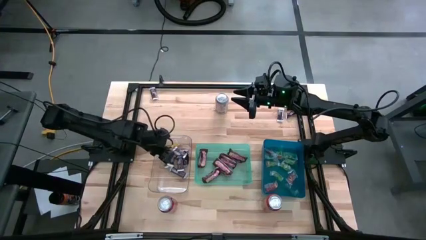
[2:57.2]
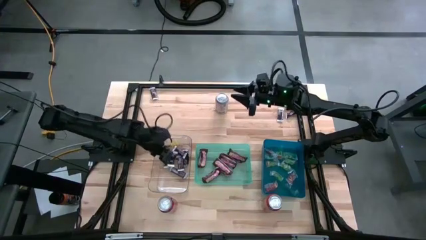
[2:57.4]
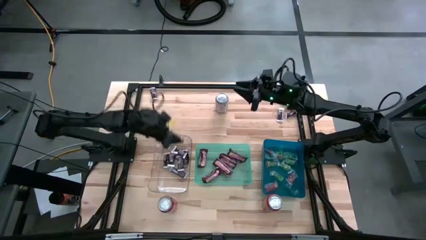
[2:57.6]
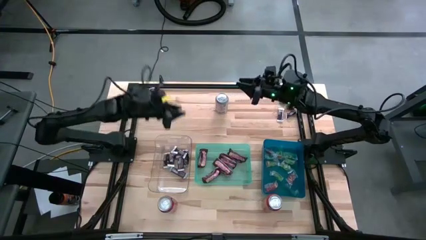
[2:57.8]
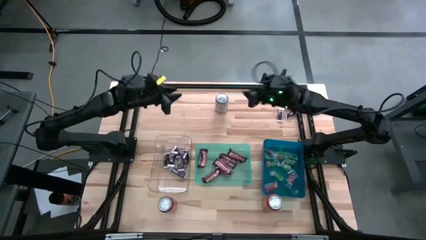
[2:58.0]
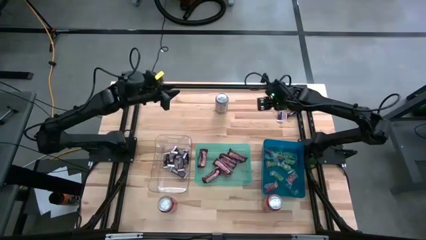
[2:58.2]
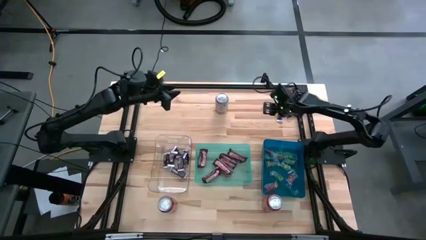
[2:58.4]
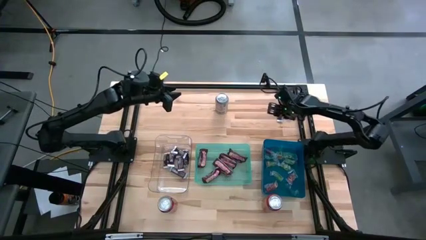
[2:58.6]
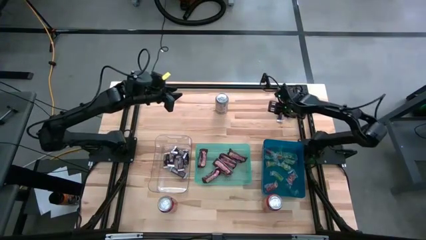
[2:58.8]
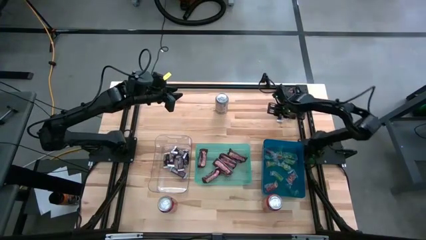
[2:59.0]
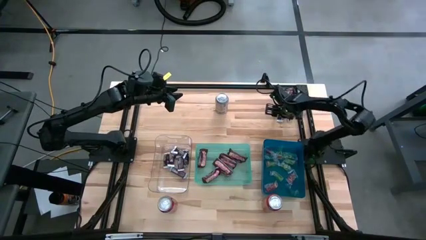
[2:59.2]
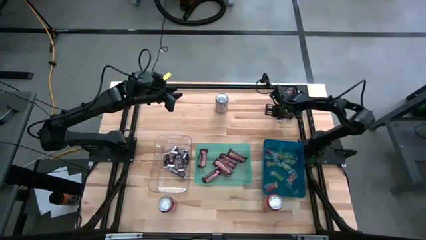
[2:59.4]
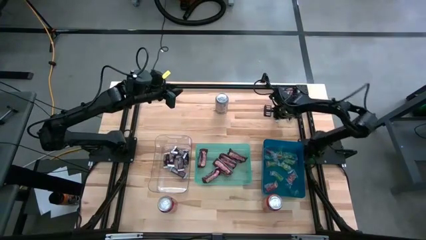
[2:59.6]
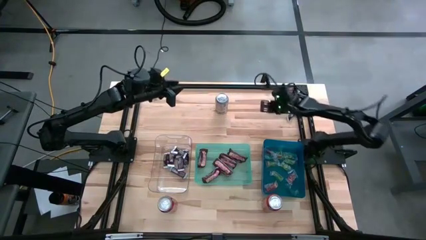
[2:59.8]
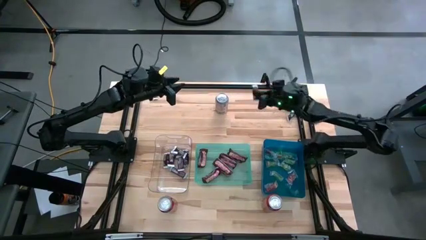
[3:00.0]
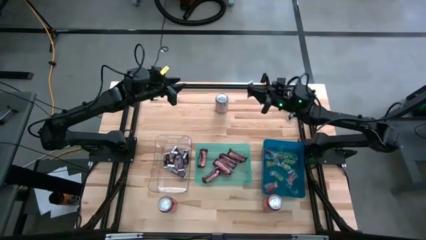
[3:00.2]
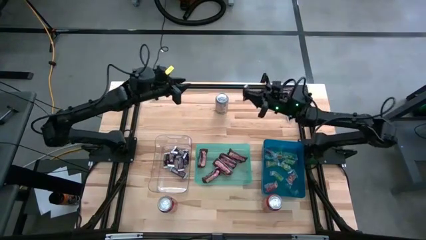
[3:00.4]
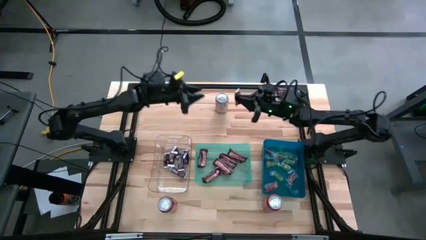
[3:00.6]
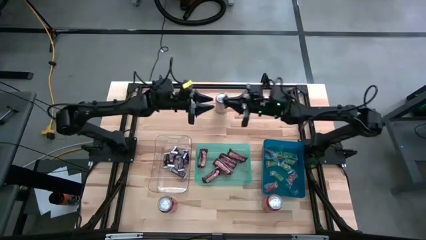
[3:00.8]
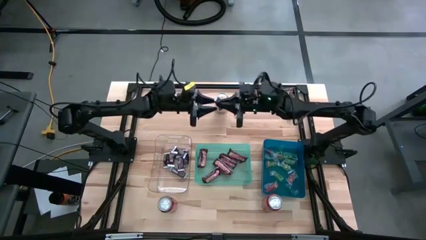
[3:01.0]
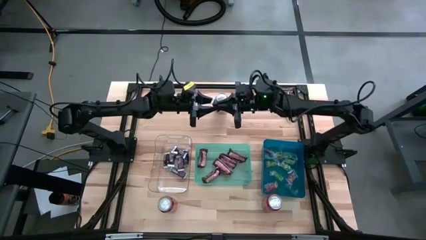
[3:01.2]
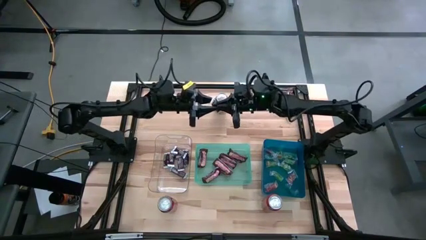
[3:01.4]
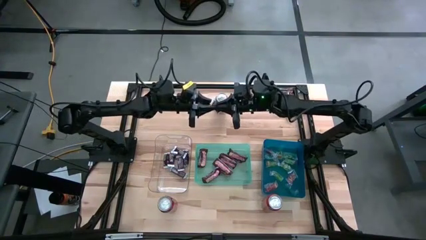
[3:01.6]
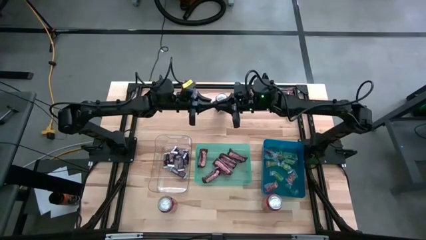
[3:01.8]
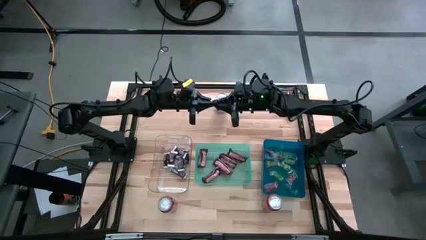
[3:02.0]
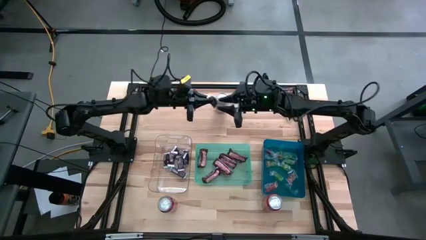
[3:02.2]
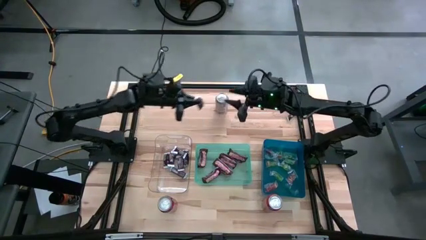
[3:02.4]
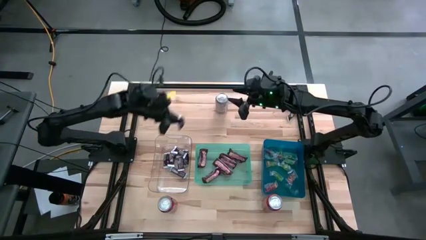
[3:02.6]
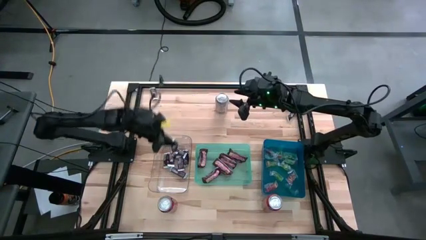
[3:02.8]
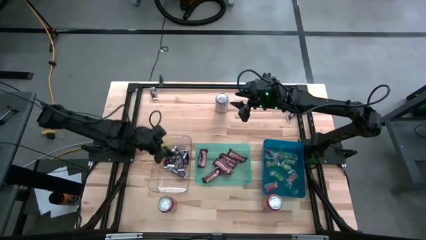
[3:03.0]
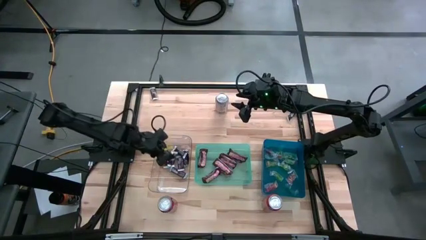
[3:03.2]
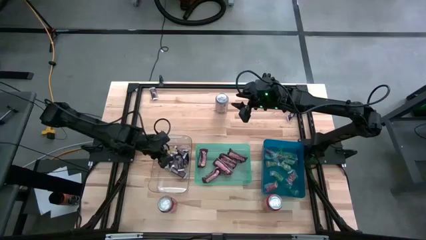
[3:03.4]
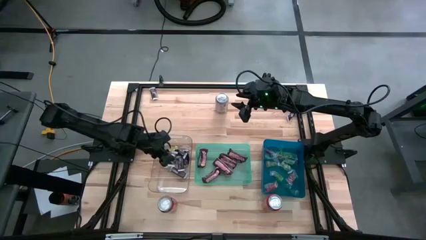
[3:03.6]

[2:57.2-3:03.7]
Task: Organize candy in baskets
Put the brown white chocolate bar into the transparent bin

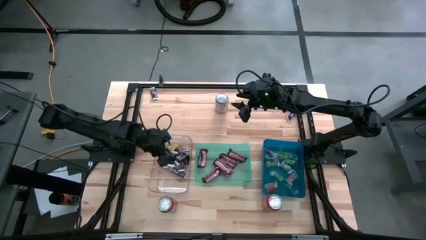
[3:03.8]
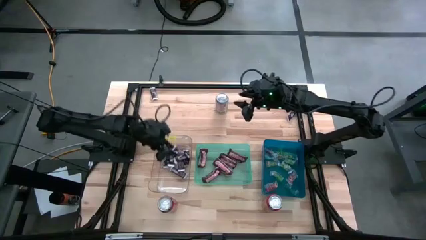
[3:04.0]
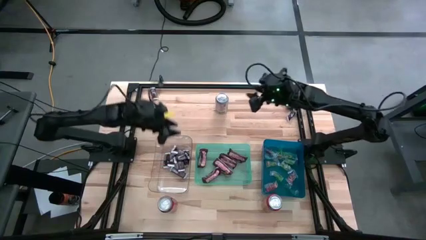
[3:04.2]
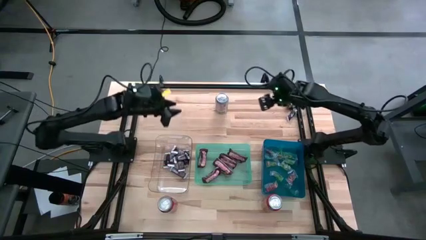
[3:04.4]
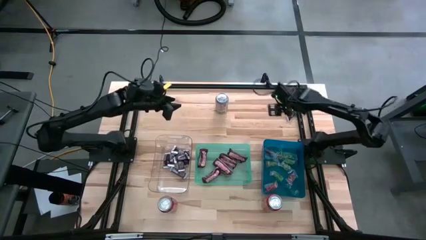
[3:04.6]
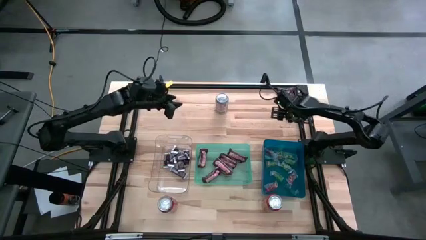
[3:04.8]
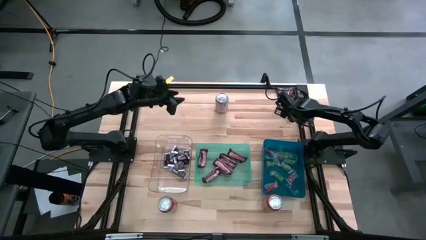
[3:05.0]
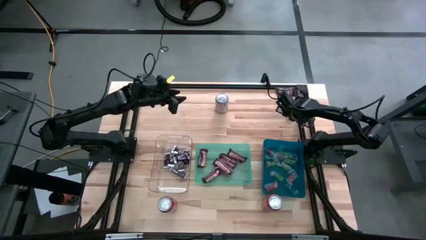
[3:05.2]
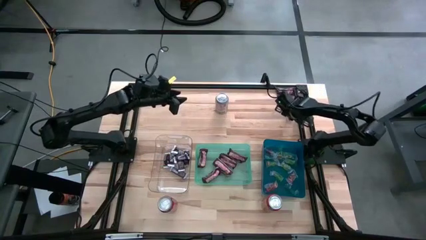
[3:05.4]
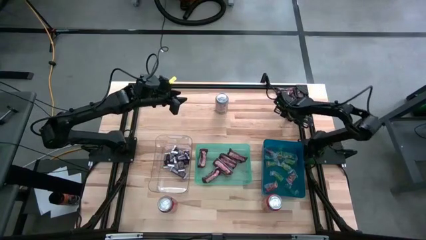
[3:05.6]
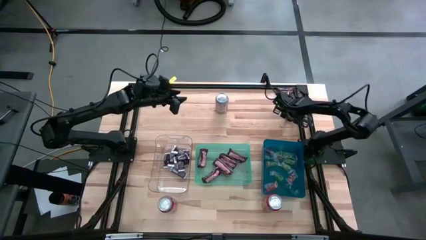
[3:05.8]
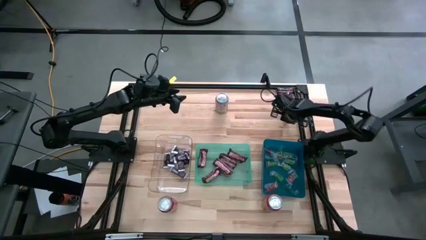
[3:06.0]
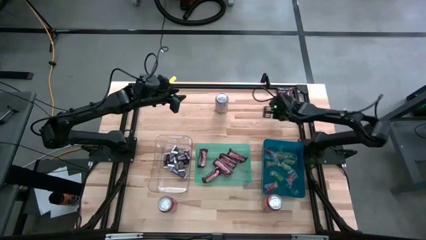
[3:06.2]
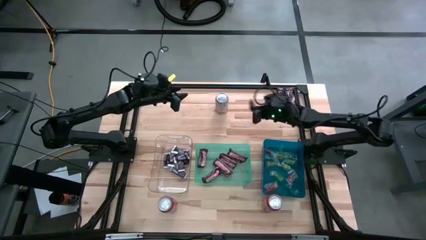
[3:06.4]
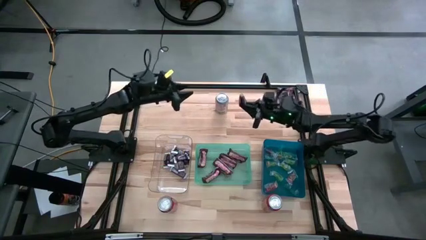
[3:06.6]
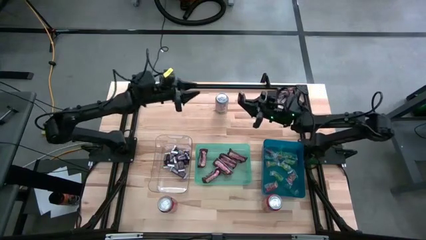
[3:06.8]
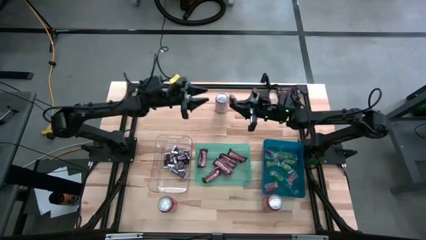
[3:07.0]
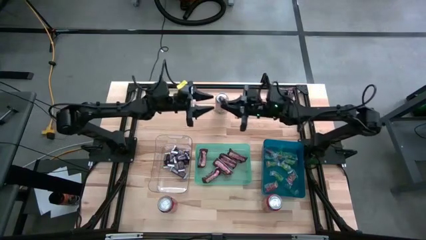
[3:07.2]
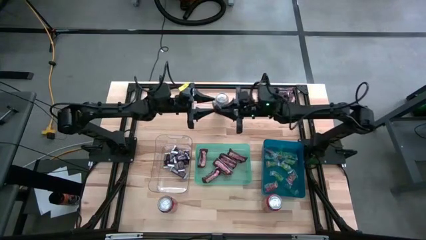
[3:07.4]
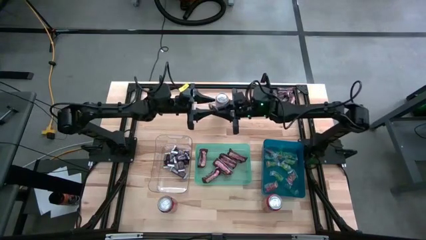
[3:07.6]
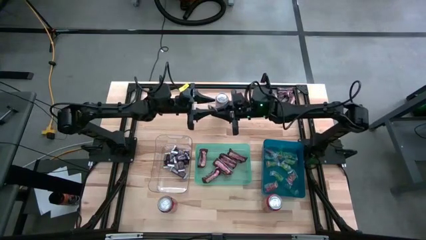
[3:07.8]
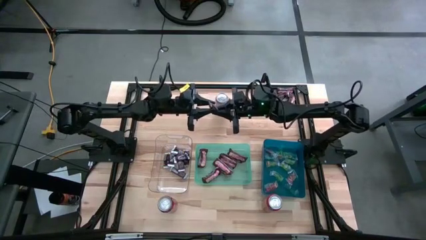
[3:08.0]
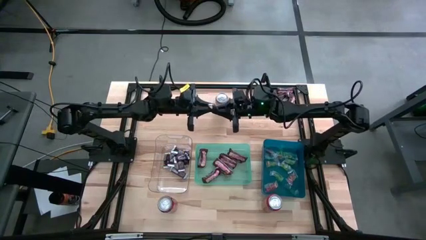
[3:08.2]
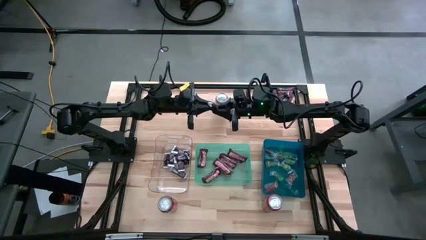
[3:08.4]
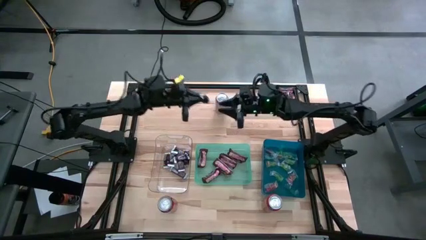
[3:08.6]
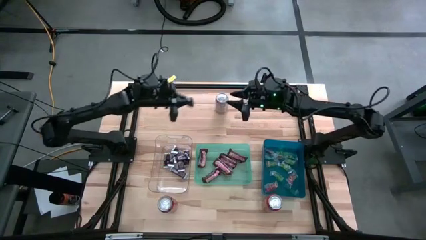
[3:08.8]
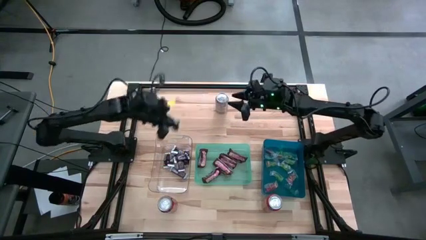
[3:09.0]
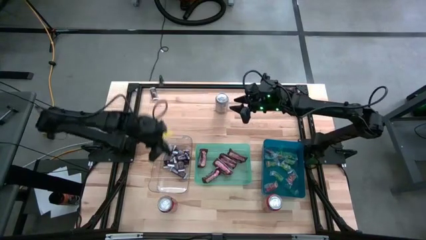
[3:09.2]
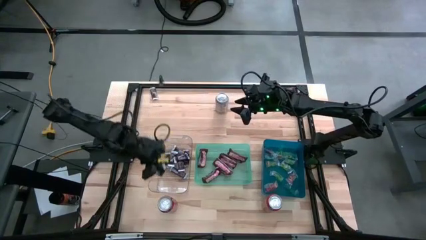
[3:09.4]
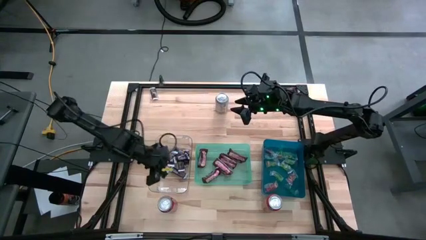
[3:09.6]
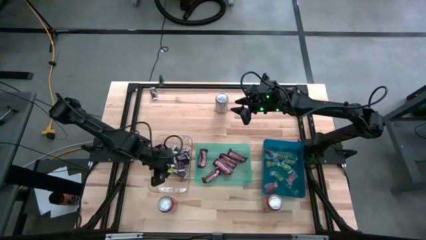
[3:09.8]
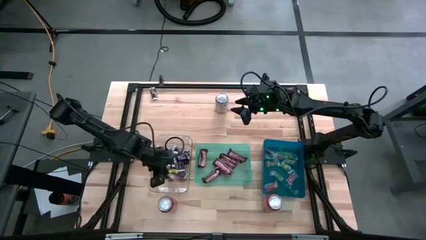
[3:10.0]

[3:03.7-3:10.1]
Put the brown white chocolate bar into the transparent bin

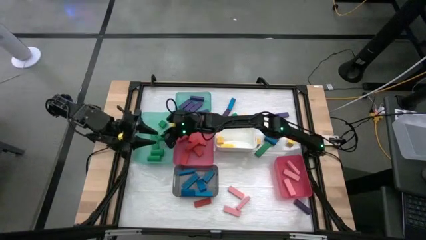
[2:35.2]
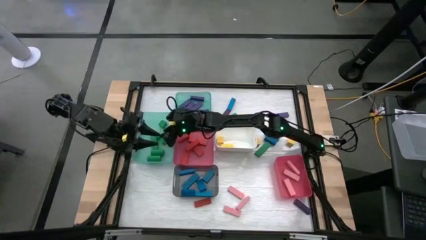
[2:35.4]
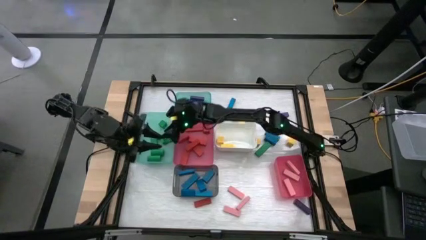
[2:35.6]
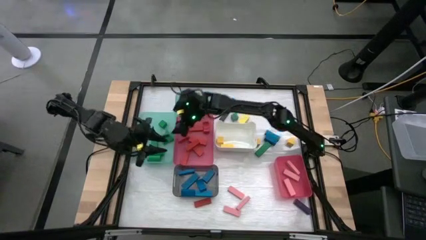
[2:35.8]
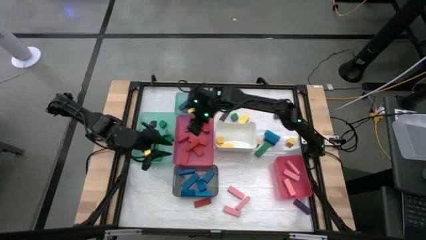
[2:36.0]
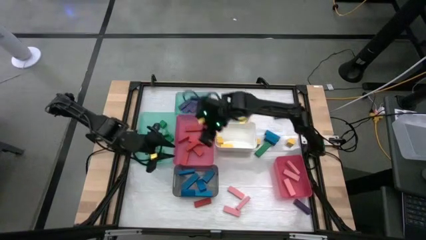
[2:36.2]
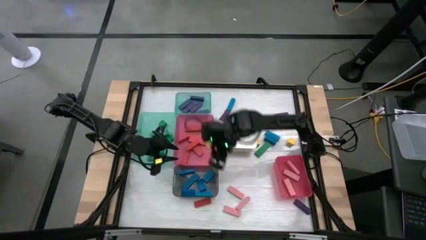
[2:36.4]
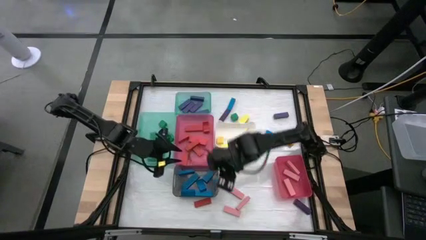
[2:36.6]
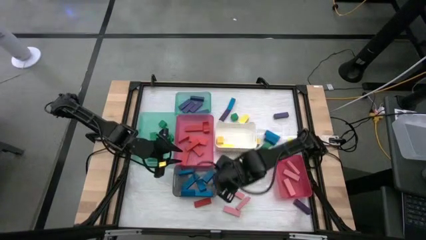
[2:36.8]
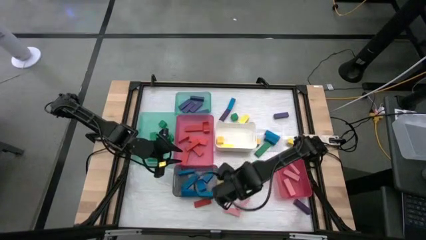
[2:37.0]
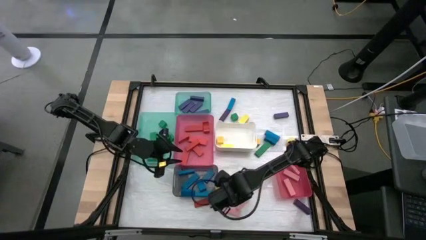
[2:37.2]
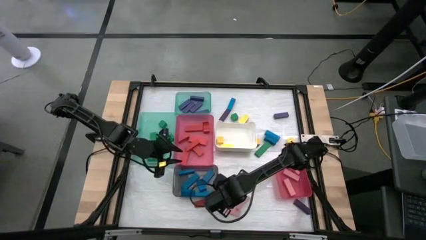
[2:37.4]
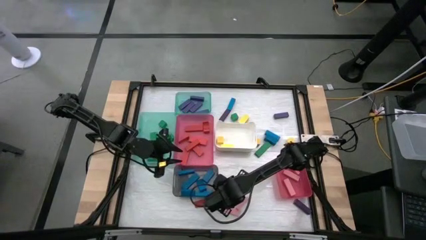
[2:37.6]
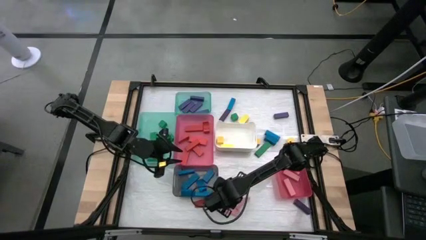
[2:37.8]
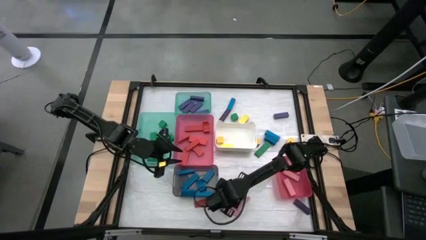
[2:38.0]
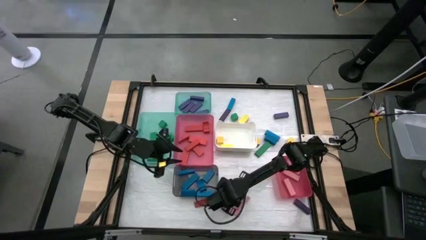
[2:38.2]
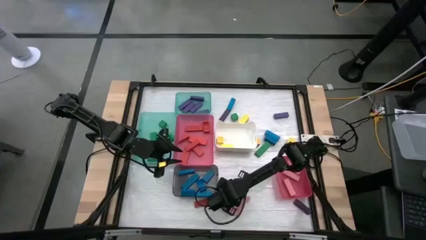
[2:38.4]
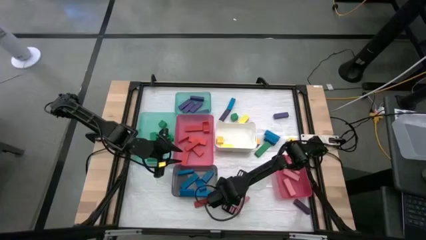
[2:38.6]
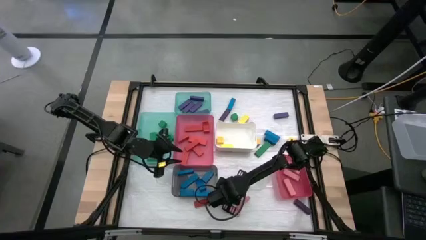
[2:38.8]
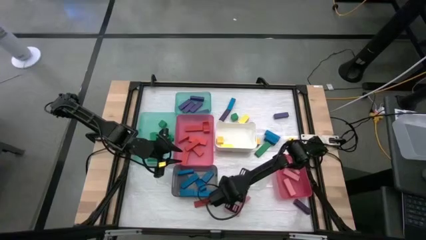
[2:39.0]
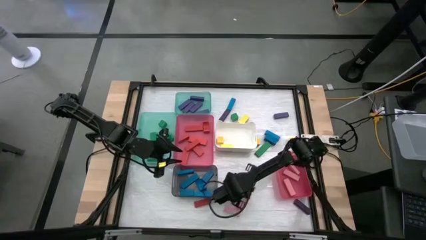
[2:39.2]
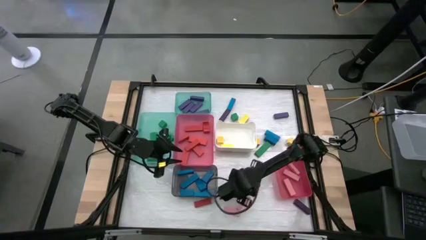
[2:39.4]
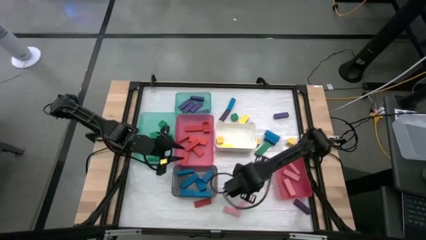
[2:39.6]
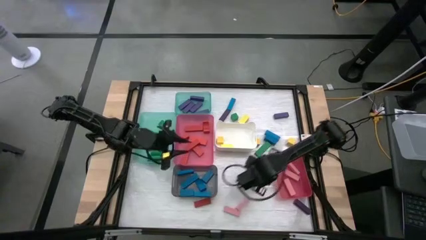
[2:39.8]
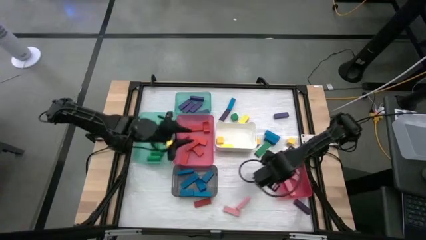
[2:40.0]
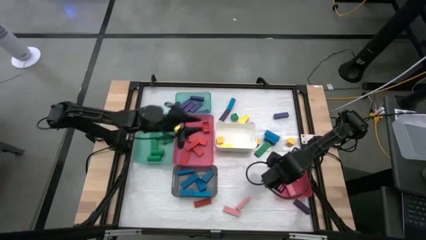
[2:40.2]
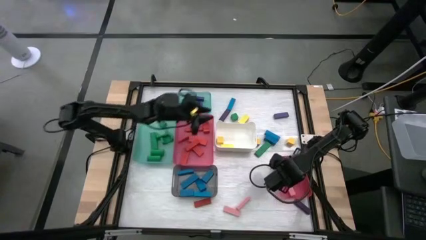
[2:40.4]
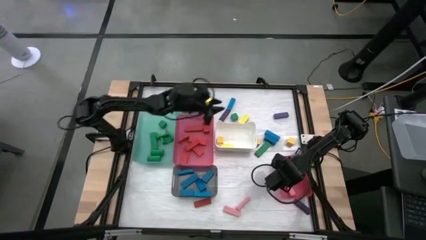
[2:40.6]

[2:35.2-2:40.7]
Task: Sort blocks
Put the pink block into the bottom pink bin
